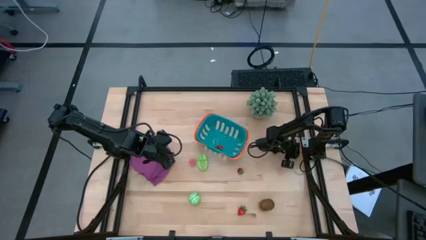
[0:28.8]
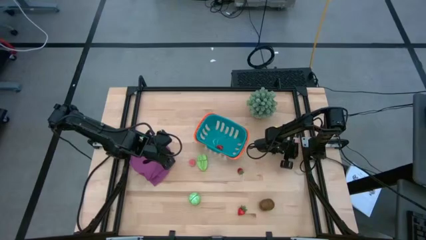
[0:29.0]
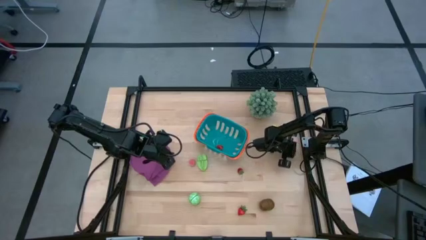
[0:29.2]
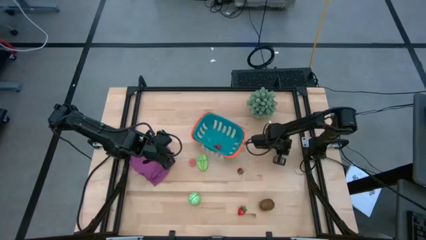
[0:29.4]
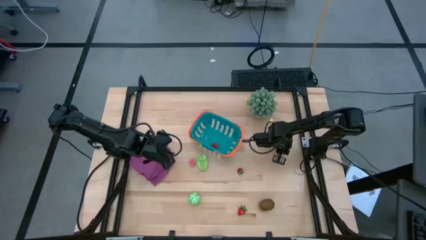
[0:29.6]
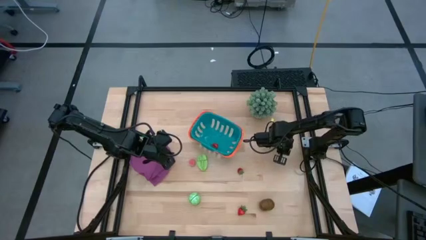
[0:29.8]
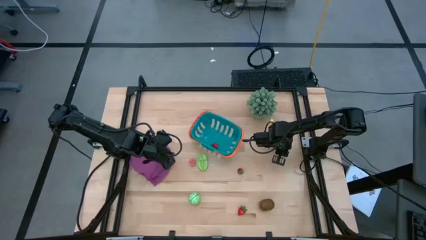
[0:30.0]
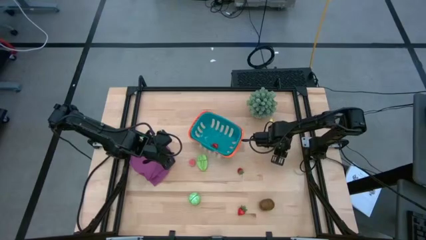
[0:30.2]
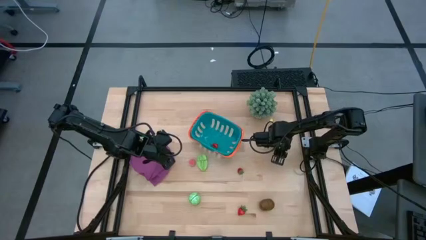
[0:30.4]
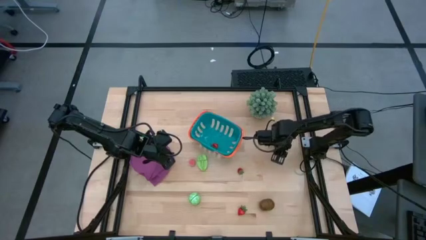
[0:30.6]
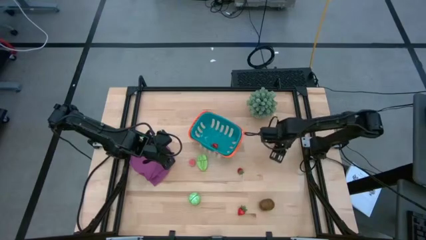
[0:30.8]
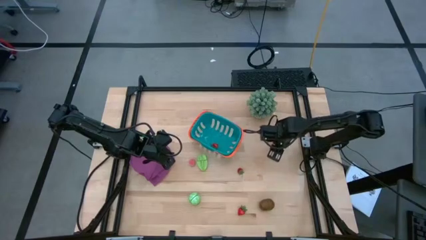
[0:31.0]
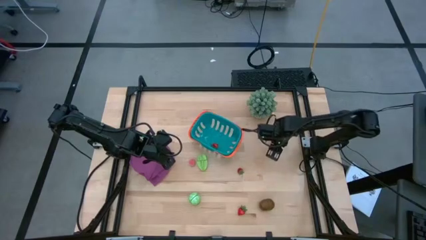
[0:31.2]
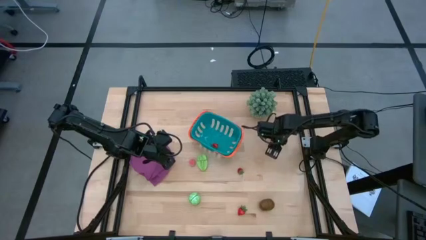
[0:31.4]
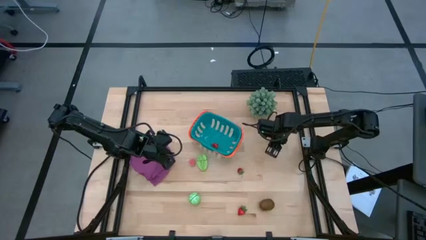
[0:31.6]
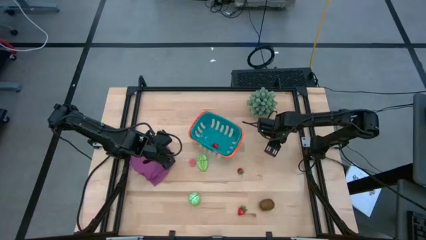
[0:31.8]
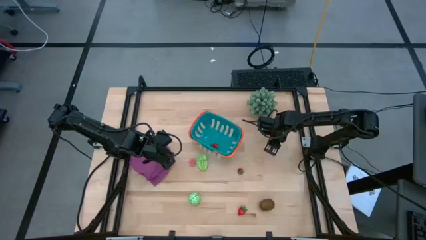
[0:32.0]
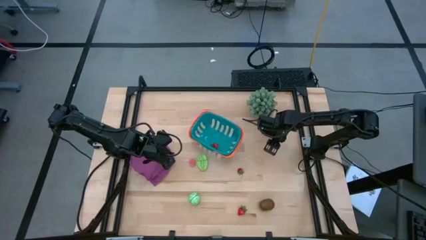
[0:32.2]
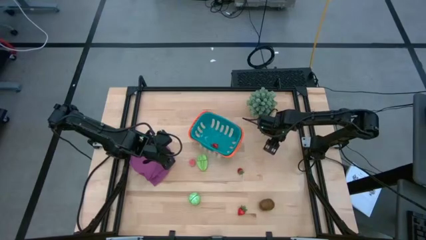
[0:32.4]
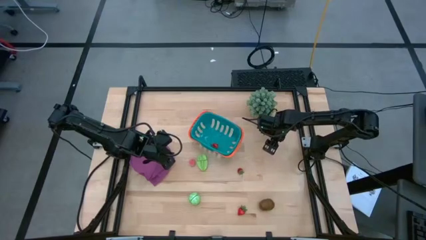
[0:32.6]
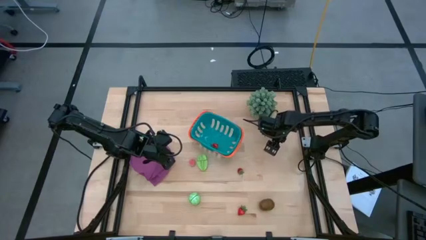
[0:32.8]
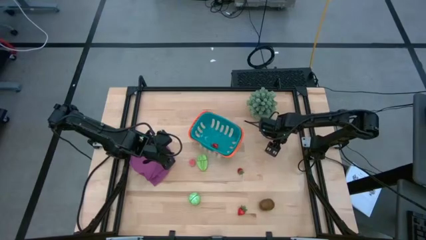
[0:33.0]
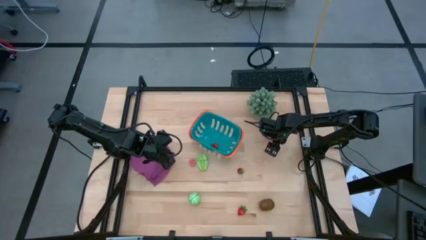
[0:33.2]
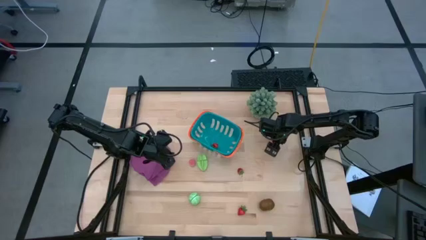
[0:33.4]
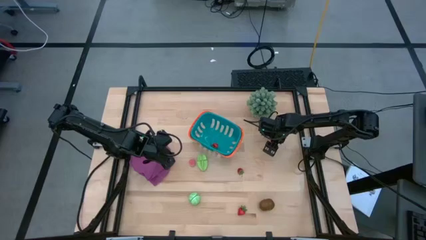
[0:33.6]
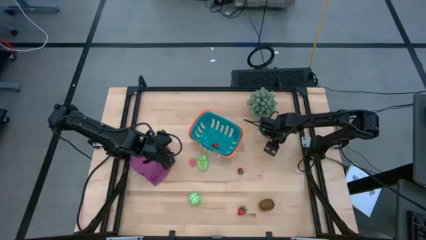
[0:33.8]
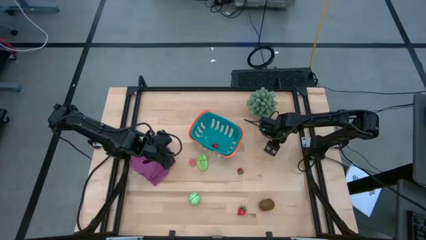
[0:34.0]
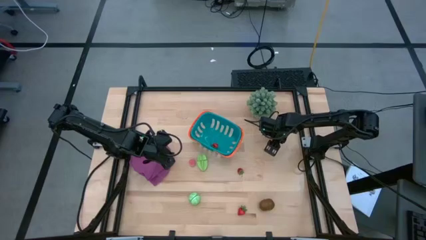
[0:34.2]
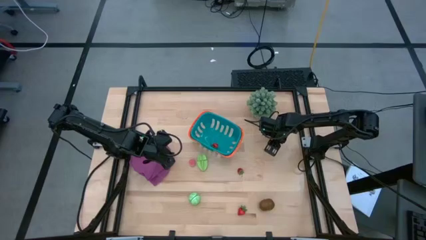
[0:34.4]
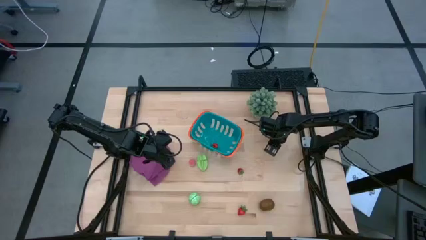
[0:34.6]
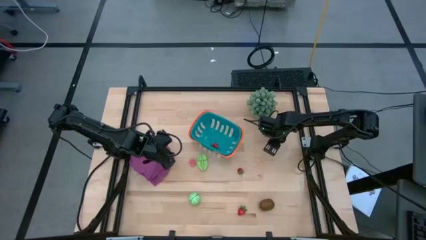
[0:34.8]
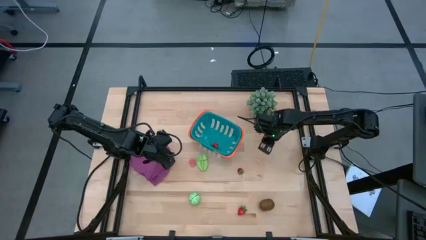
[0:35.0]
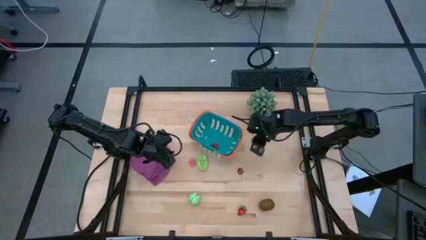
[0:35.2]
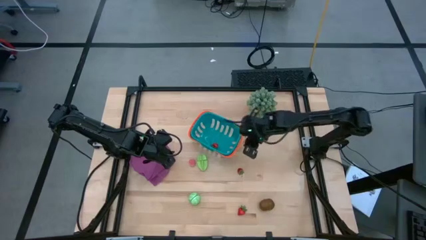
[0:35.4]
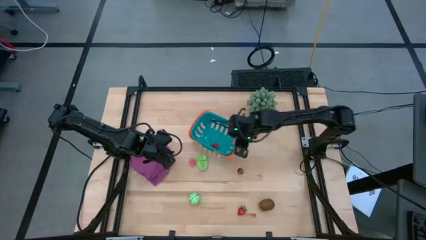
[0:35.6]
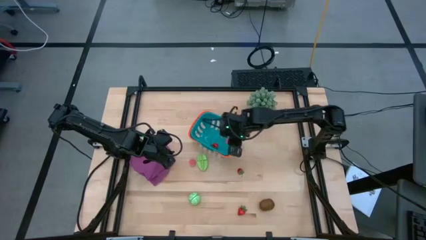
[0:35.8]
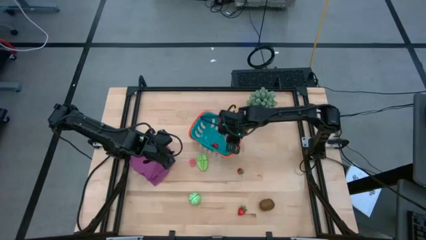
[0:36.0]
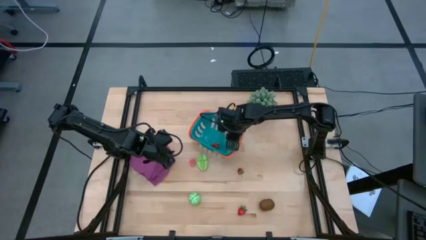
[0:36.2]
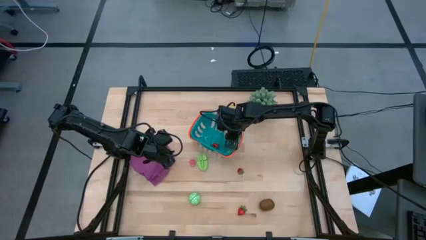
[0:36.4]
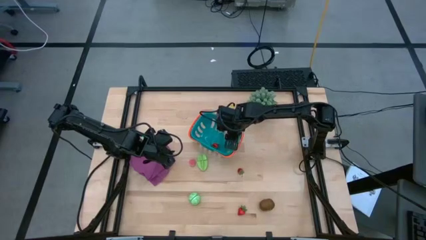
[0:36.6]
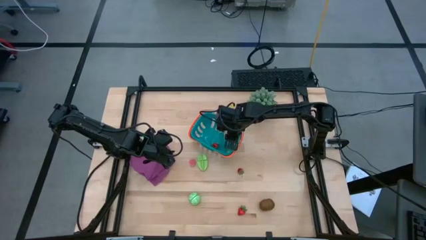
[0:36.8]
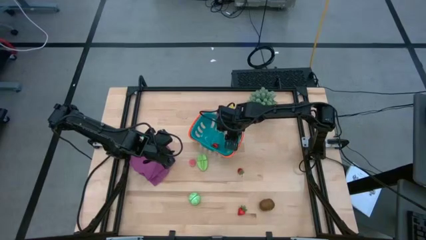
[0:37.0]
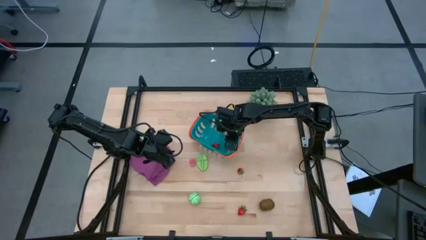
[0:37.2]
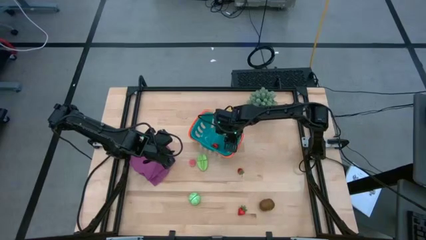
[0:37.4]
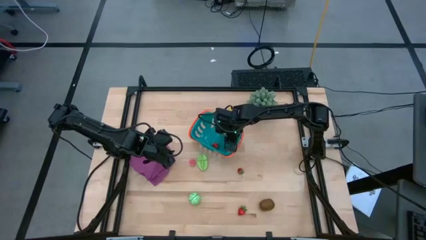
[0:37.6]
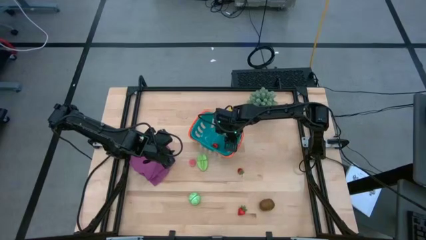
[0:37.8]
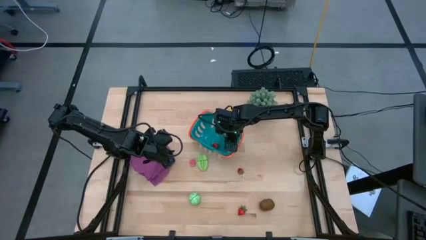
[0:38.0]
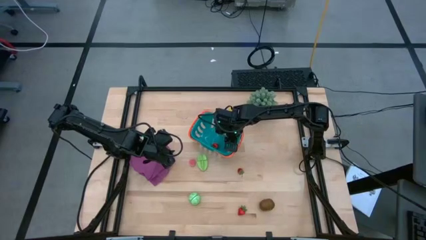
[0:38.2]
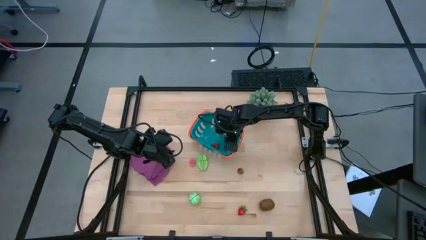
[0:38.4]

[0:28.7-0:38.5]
Task: Pick and placing Produce into tupperware
Put the right pink peach into the blue basket

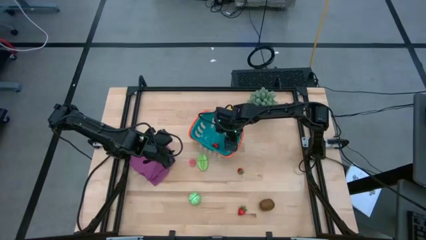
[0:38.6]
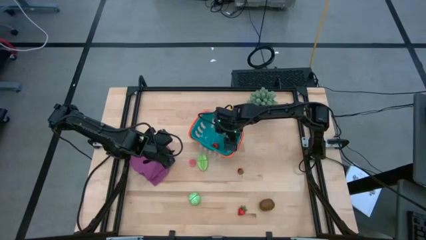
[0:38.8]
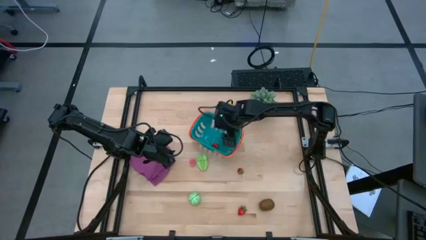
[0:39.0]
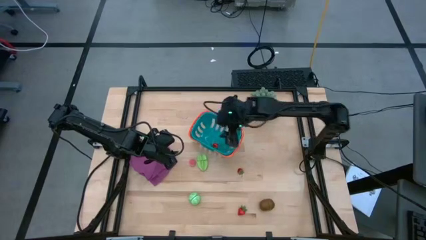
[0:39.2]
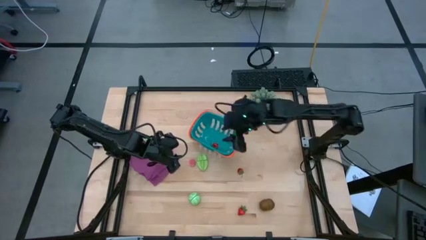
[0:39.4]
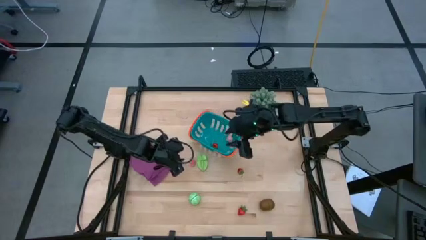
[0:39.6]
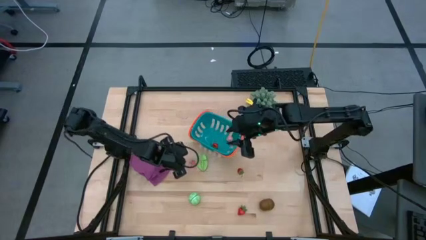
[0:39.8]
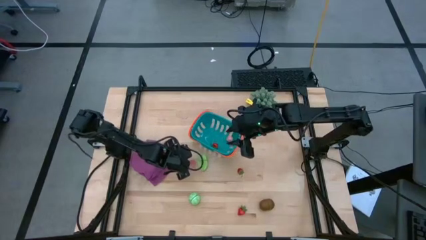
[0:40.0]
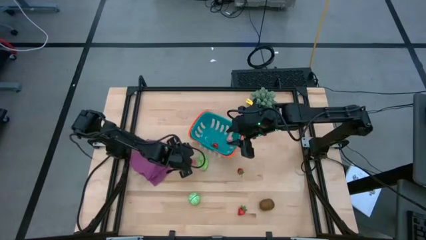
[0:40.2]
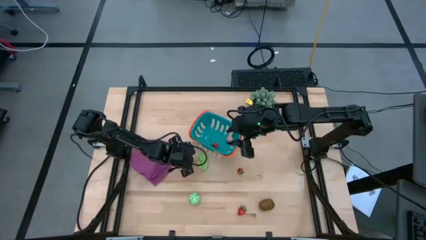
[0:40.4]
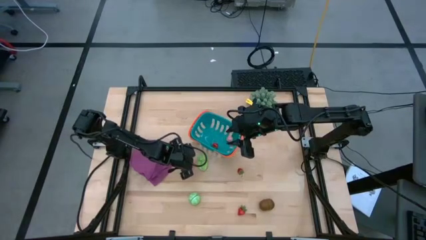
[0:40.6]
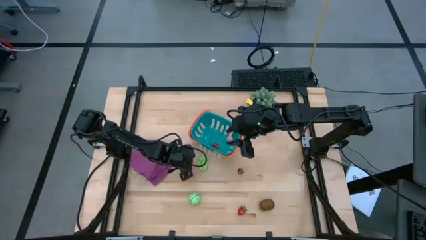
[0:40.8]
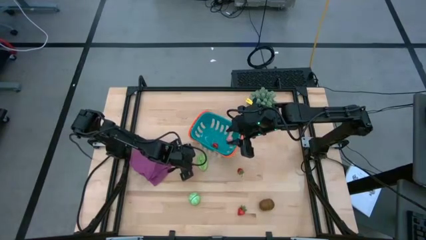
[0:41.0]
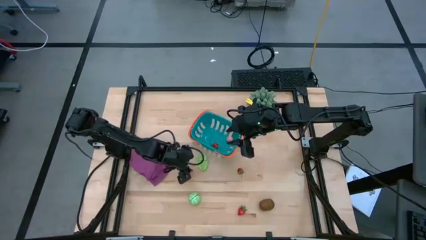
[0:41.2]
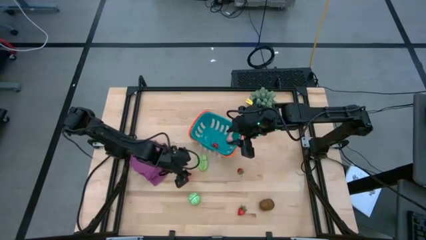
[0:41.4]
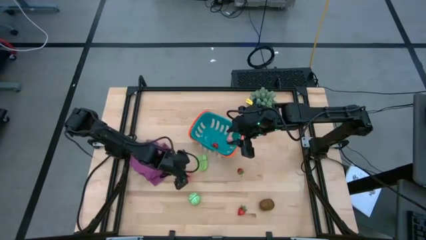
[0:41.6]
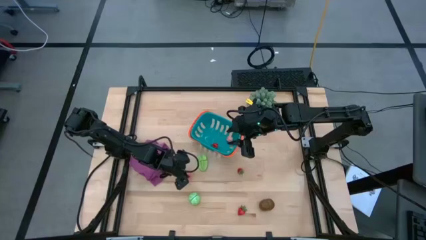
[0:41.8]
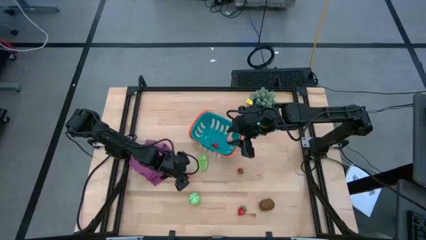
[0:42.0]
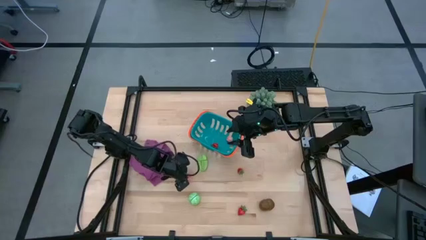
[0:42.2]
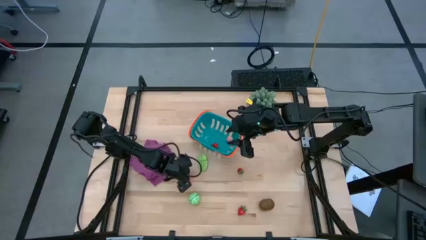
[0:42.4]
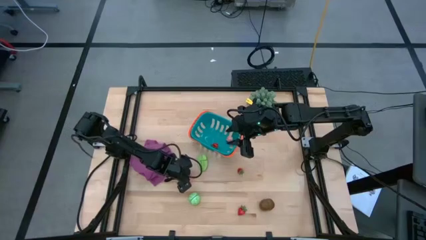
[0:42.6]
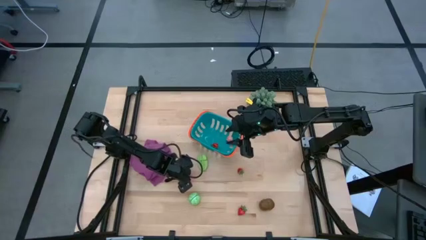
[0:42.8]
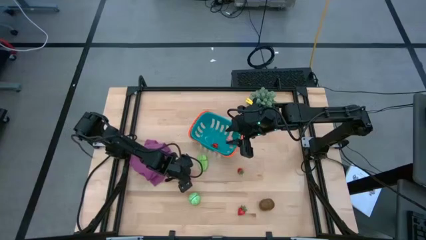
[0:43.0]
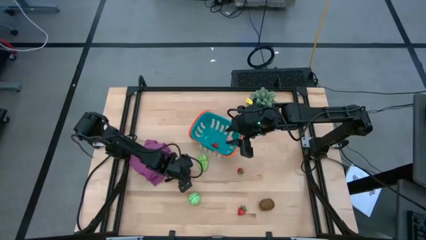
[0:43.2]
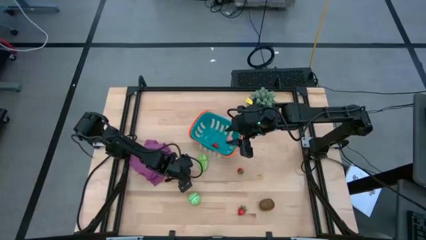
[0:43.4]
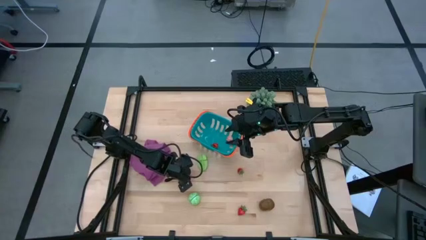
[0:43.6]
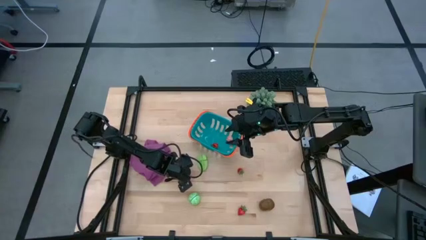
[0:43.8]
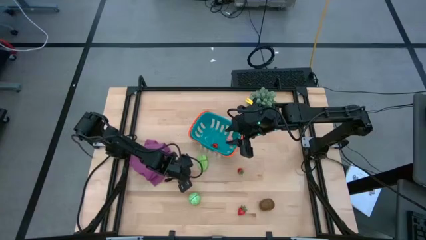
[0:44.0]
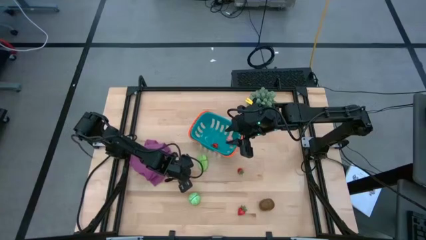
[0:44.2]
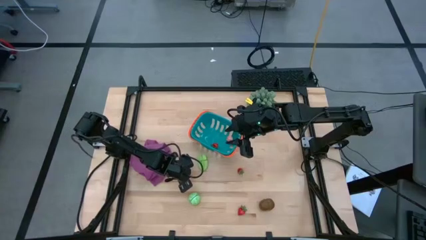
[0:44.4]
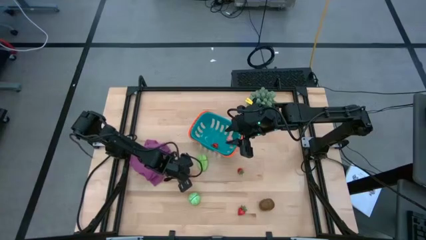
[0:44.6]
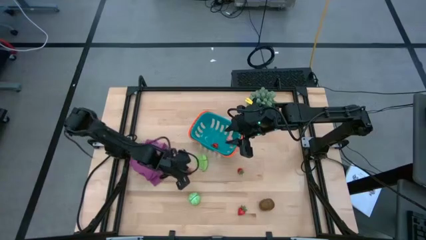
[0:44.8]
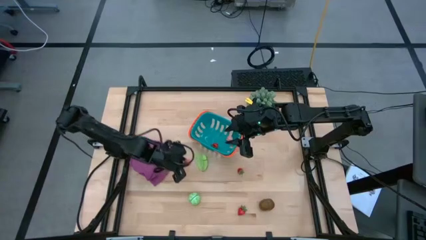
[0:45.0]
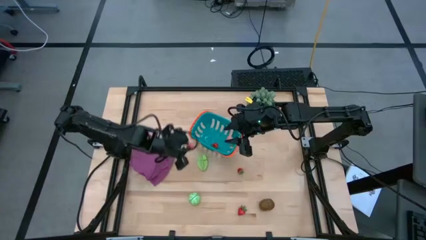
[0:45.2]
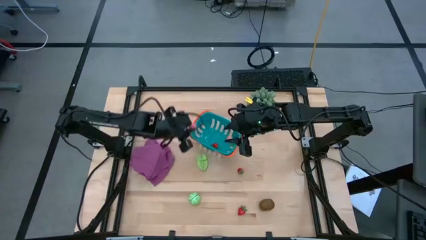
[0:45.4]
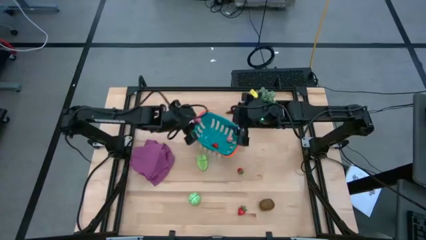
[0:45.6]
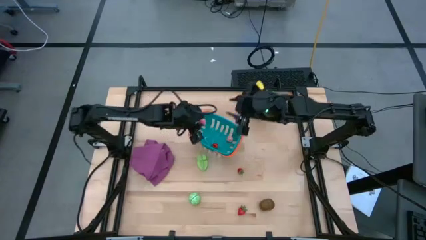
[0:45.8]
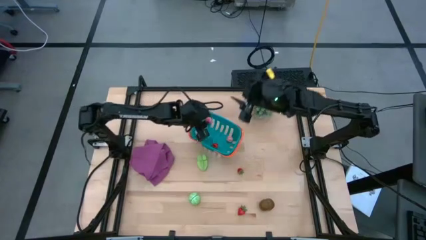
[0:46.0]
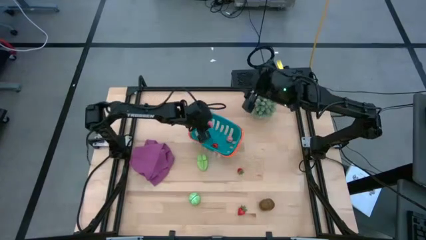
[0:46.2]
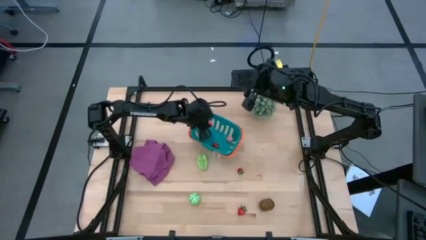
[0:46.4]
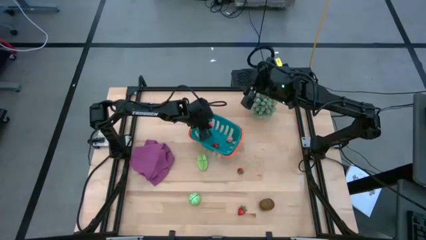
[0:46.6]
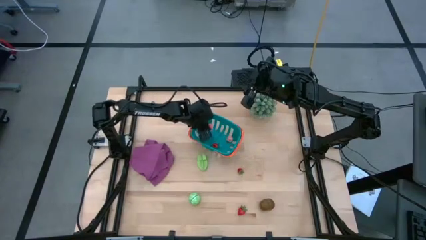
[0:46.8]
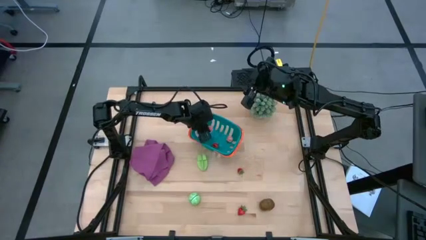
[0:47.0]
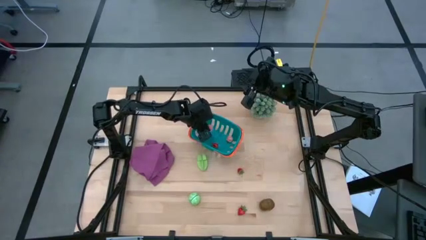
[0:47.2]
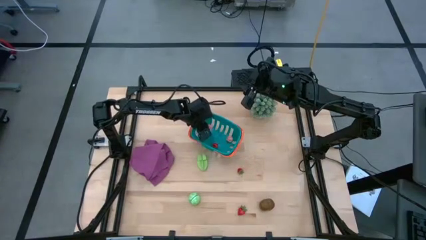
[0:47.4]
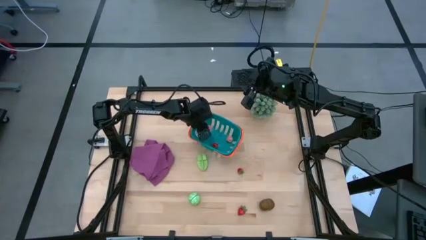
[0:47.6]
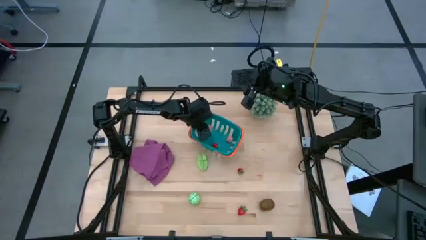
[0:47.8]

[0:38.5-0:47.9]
Put the pink peach into the blue basket
